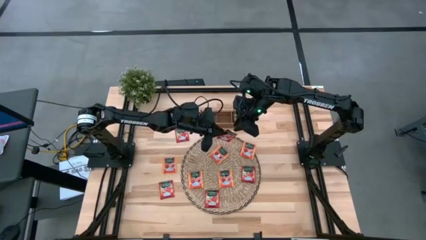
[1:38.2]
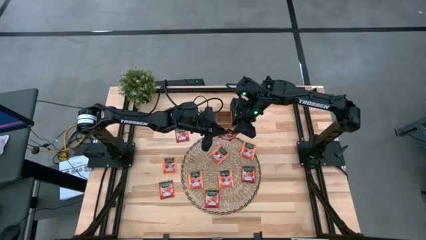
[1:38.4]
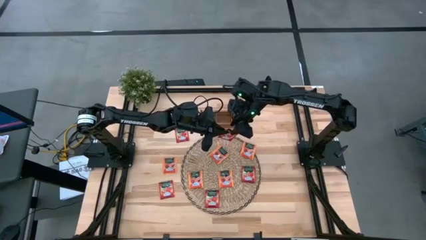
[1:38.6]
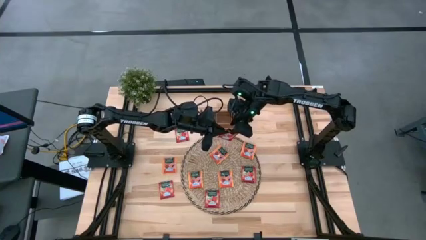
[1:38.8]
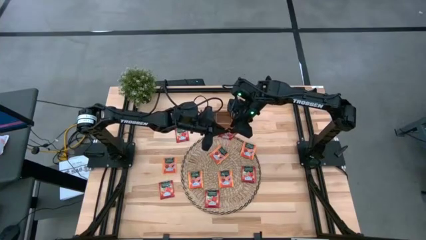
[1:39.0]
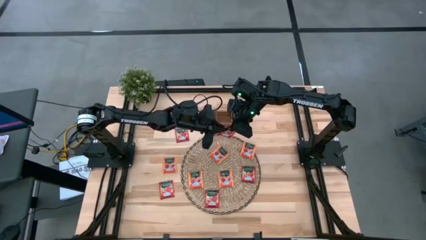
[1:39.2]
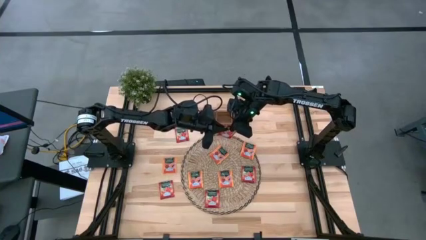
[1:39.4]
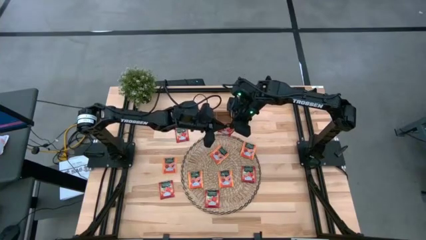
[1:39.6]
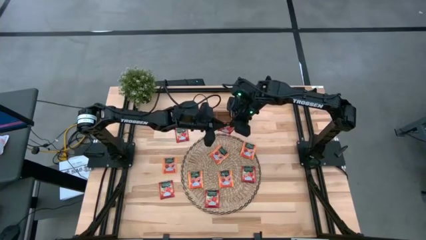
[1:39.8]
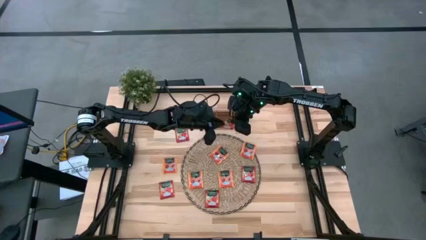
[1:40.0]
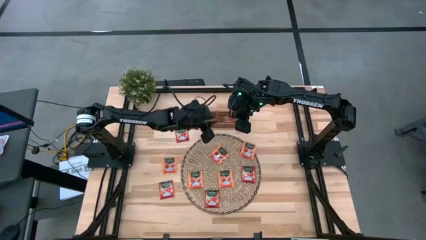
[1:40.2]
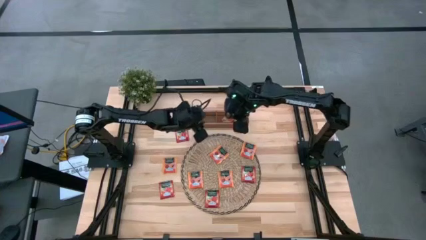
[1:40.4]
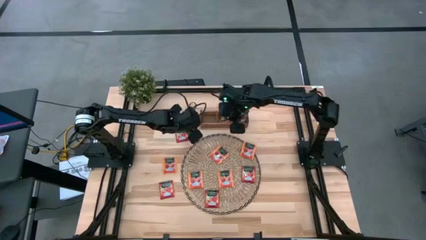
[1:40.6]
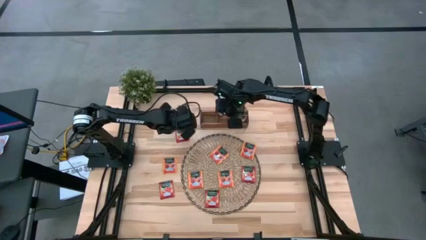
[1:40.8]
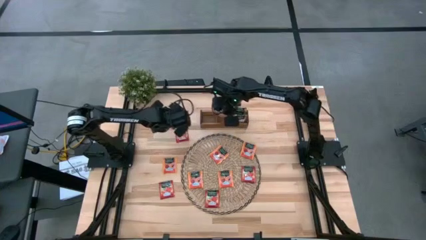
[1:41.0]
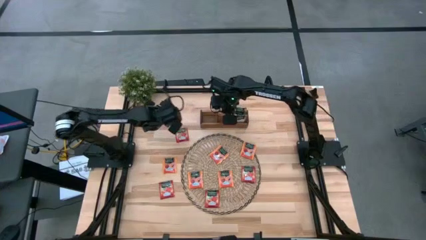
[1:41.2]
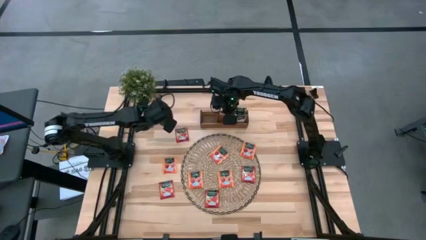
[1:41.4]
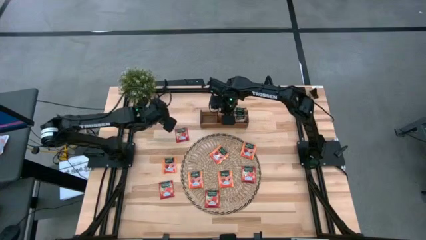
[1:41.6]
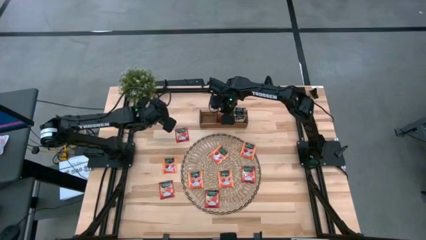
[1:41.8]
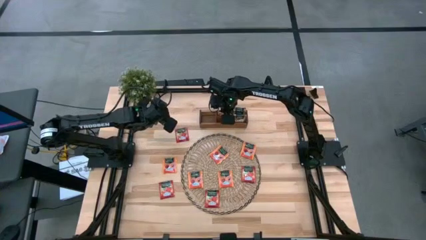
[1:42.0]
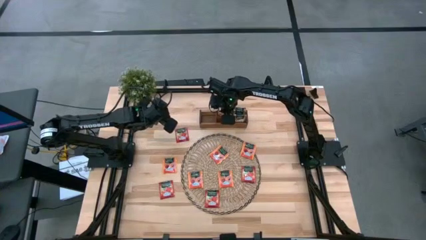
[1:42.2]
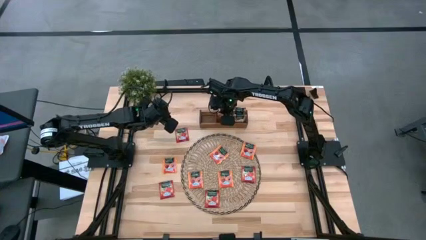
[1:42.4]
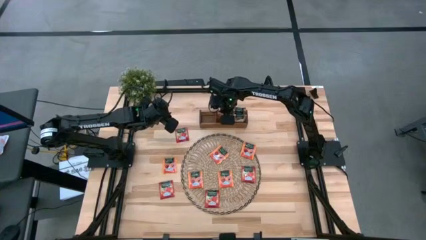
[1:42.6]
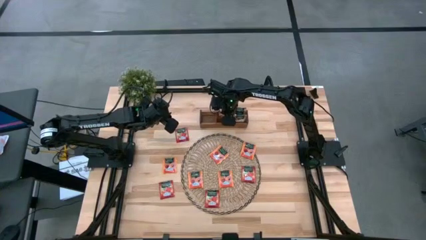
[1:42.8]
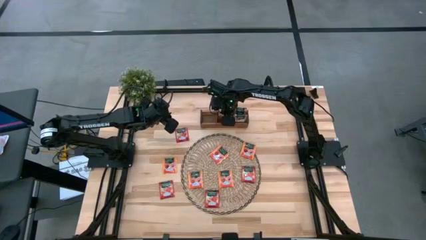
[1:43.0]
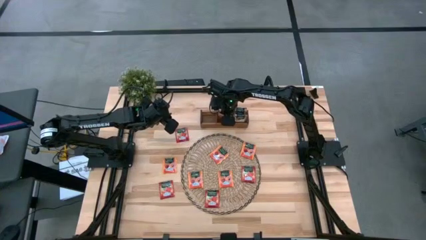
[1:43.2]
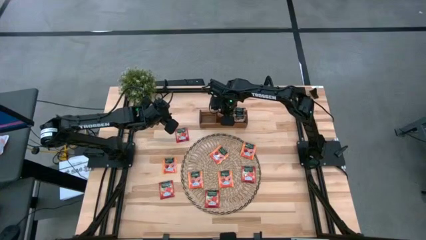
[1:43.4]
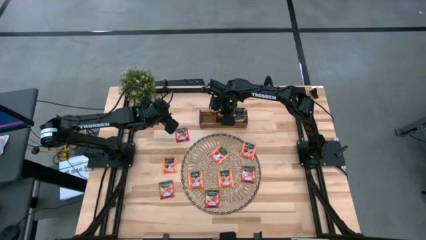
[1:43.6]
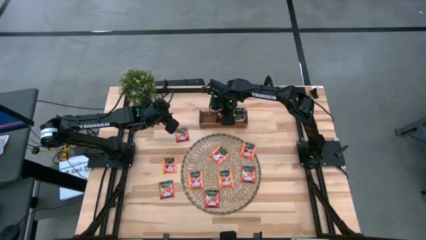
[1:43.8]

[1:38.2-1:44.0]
Task: Pick & Place Tea
Put the red tea bag into the middle section of the wooden organizer

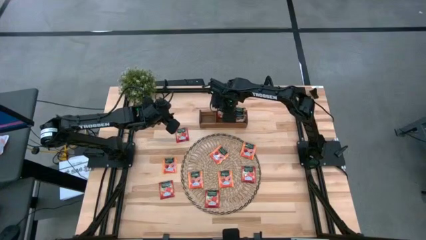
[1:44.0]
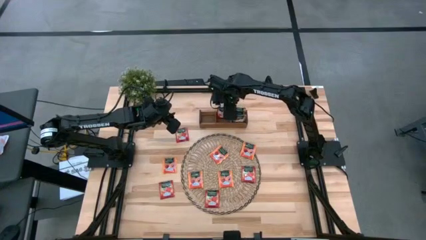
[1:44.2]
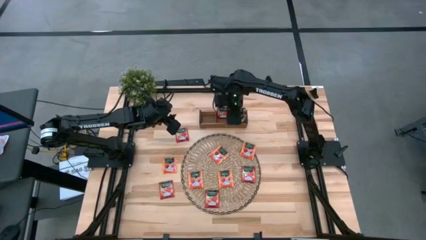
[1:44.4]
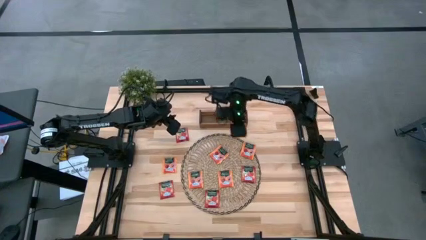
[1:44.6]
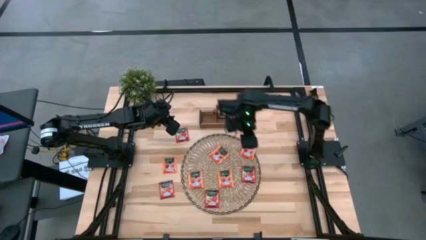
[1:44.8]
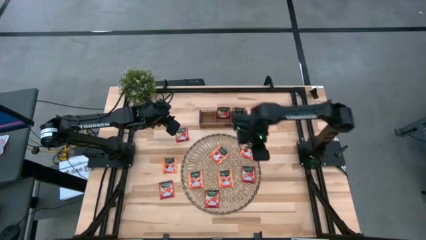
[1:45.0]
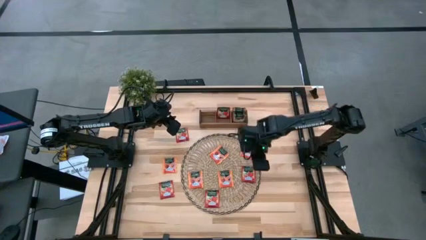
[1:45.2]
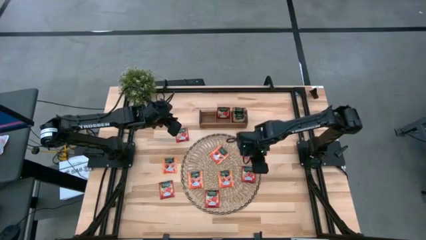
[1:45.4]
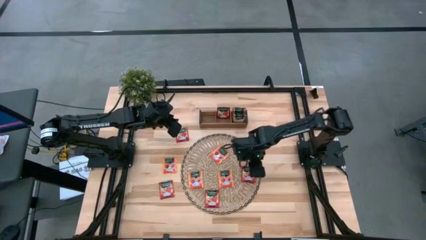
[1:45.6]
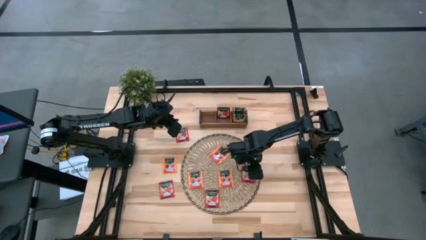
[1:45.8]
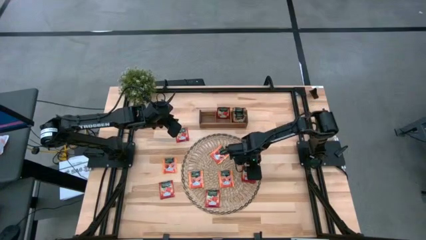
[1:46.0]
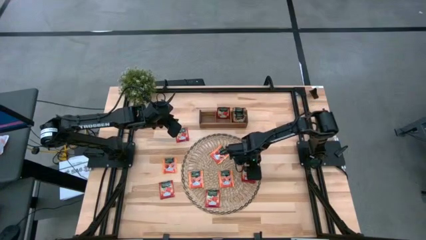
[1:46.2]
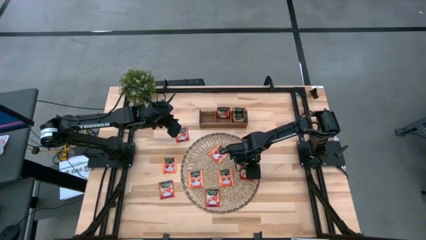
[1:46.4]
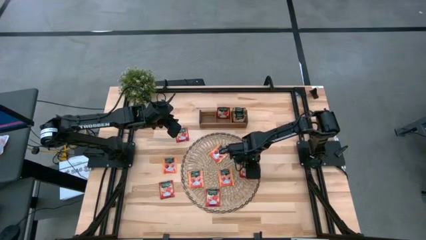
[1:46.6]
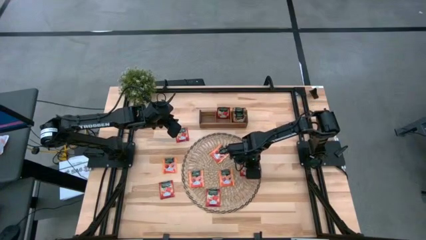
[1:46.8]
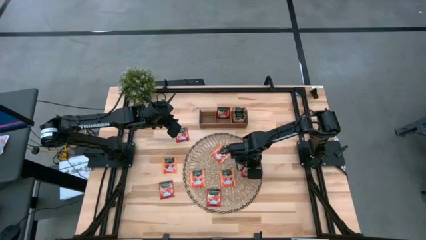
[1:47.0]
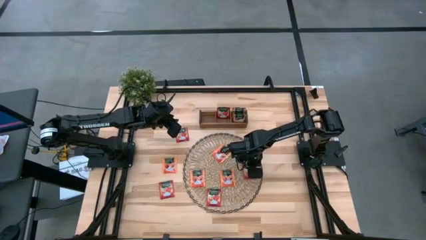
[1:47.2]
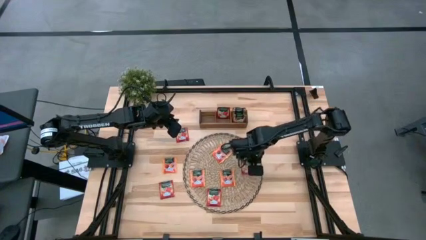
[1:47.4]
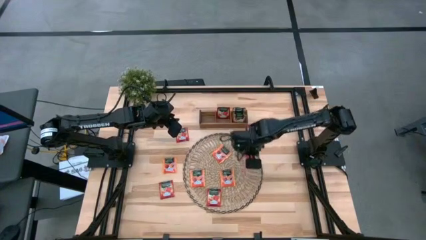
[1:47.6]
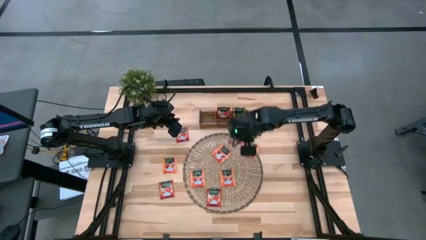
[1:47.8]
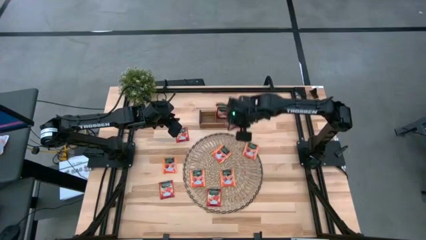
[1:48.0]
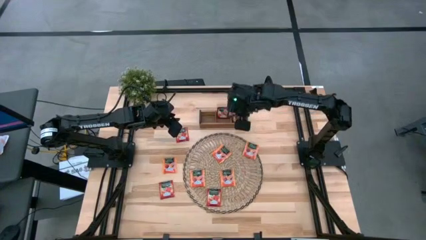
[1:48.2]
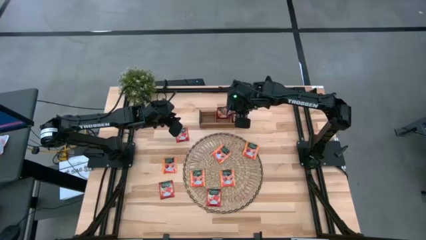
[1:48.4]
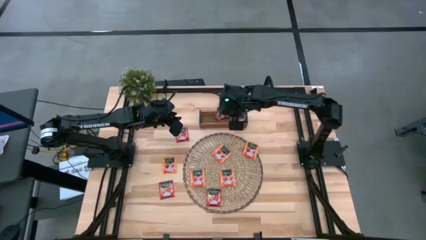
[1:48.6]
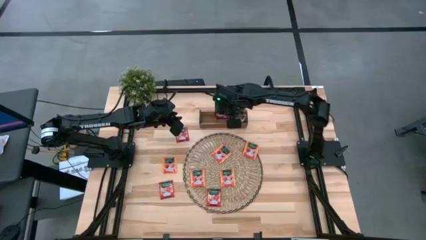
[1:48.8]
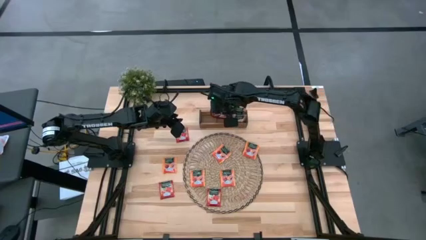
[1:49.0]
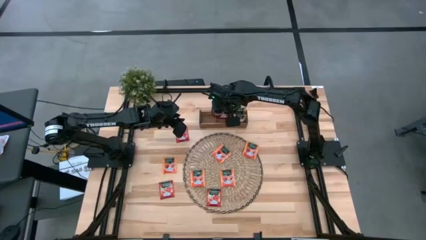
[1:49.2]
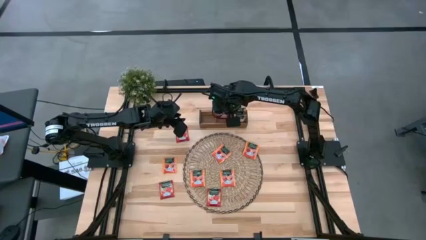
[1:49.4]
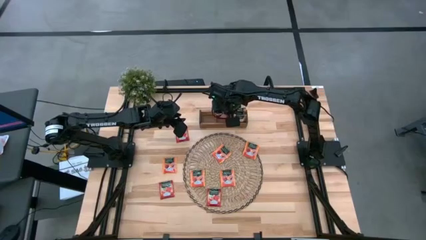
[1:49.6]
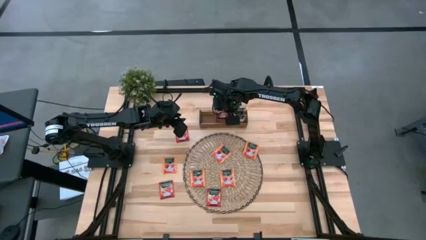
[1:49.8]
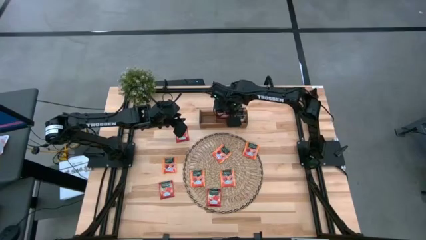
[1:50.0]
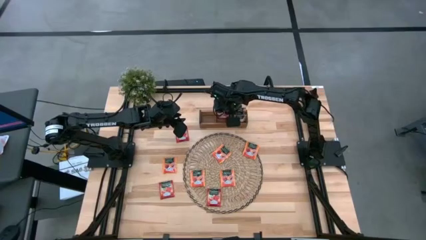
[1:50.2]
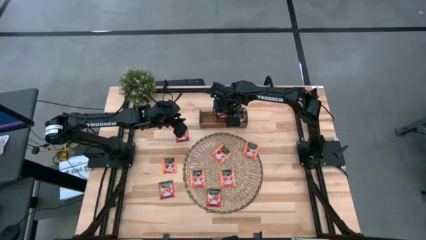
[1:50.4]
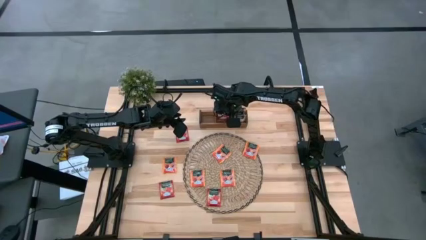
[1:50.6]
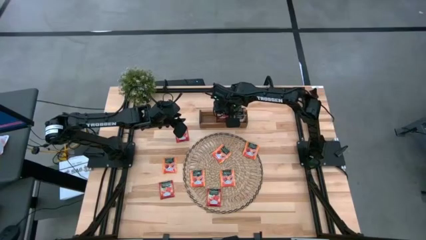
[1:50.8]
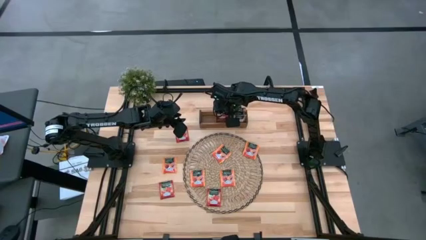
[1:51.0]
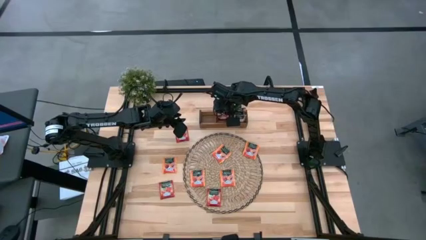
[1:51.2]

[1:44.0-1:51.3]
Put the red tea bag into the middle section of the wooden organizer
